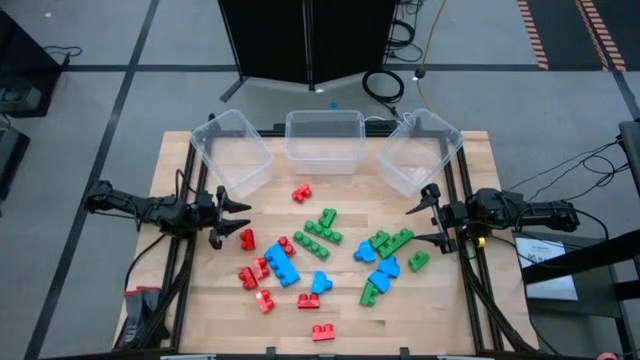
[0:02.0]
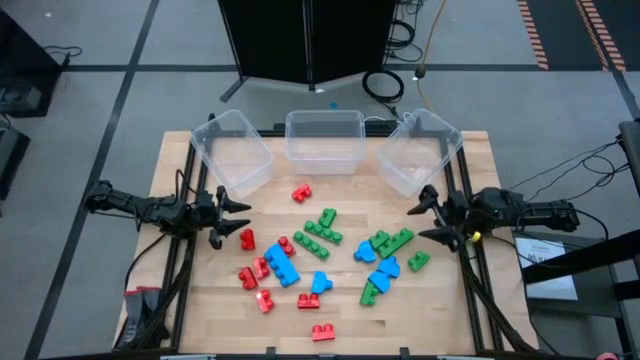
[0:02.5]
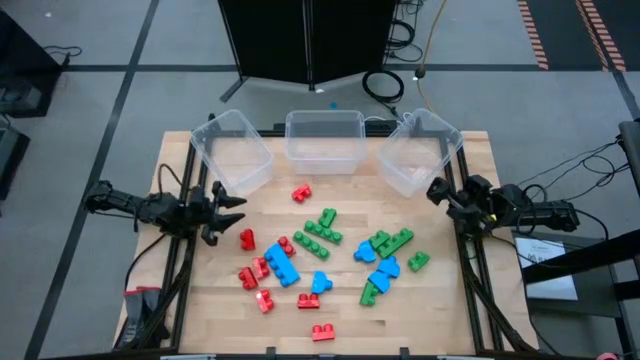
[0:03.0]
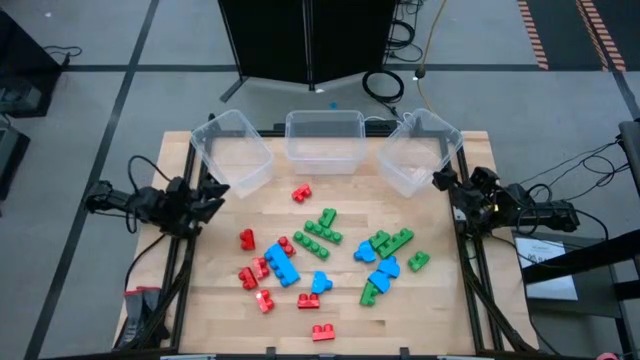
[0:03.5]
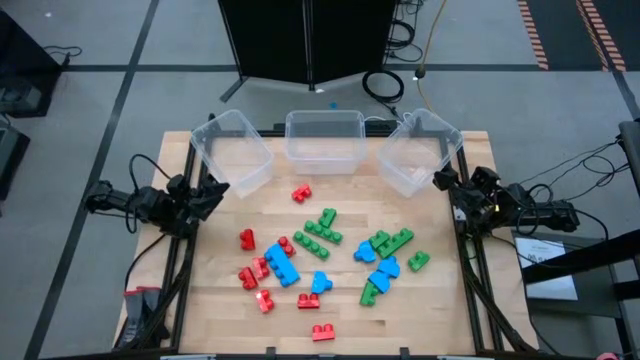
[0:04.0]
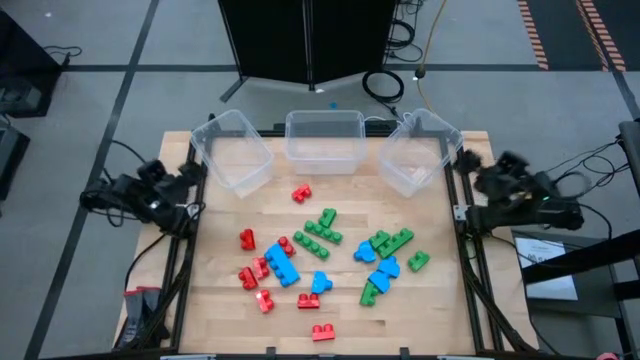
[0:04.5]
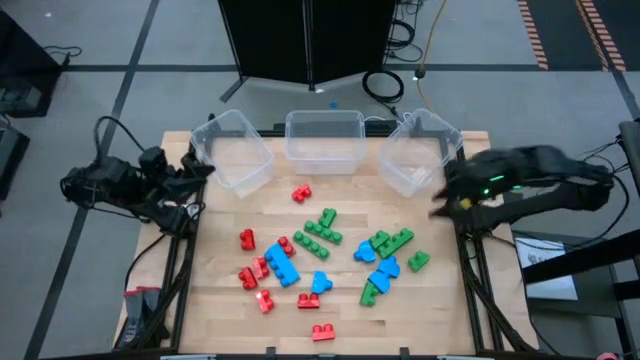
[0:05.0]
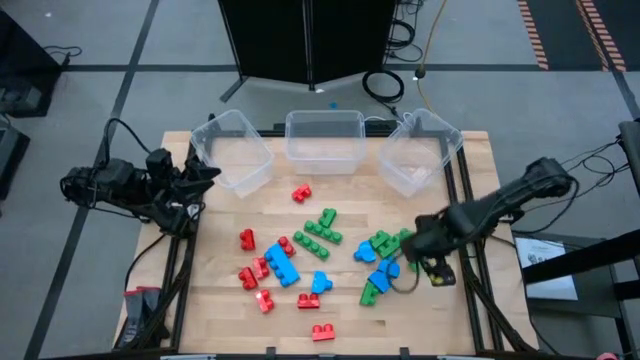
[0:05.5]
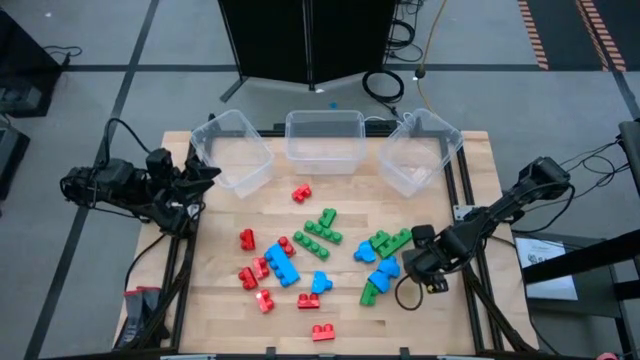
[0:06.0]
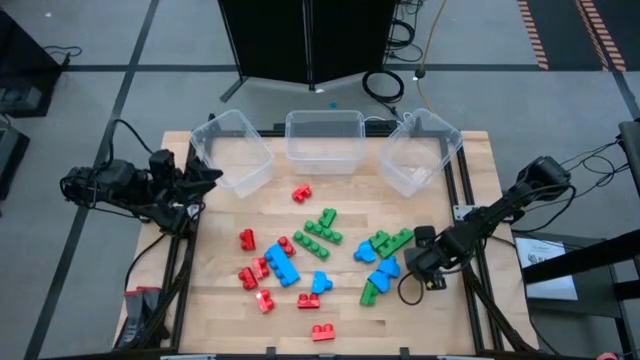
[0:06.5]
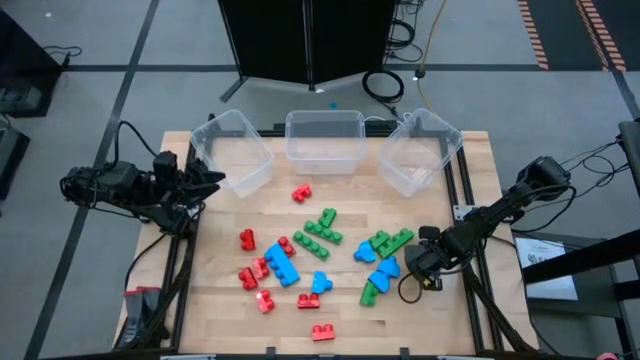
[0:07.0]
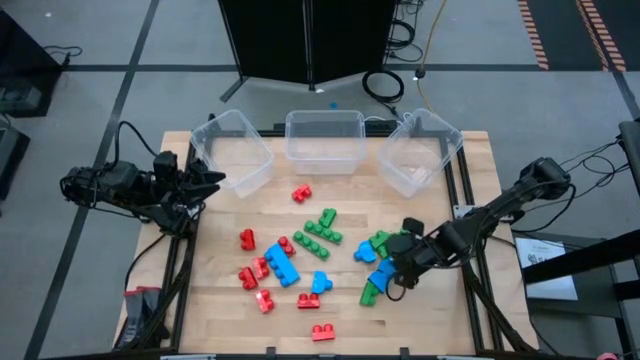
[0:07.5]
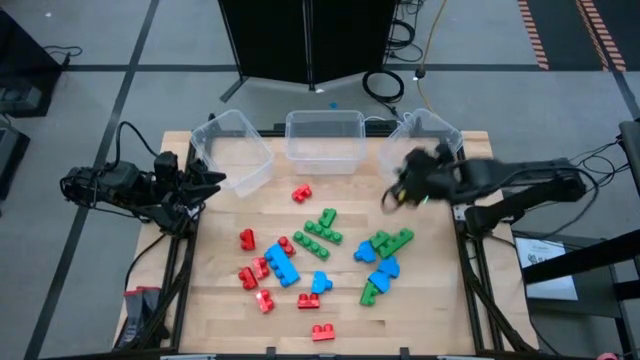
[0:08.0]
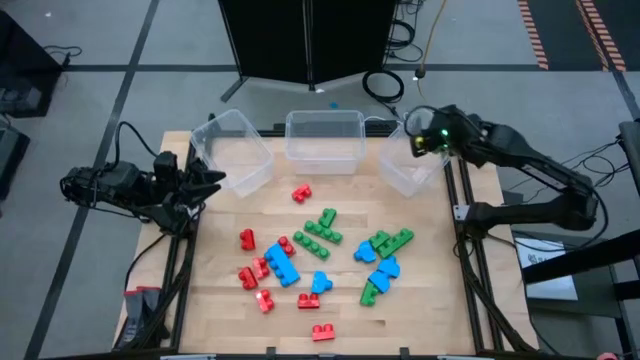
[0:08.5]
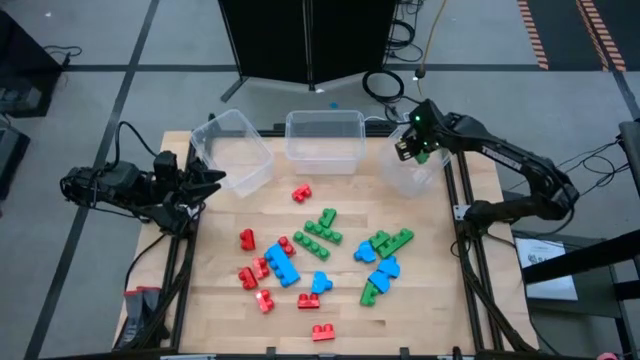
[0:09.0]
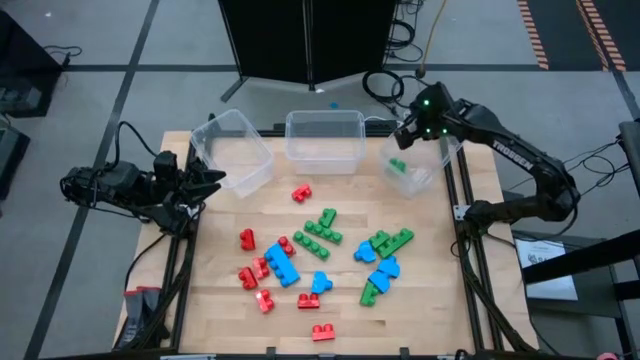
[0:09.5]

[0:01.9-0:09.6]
Task: Sort blocks
Put the green game piece into the right transparent bin

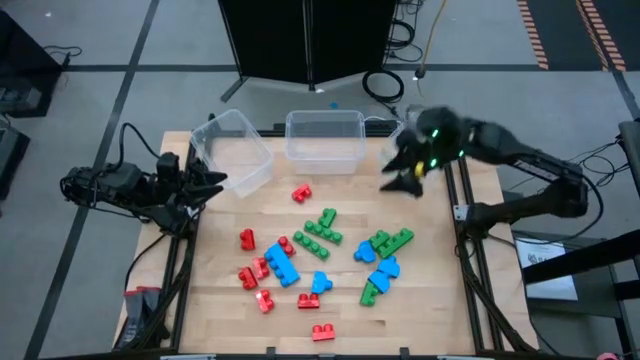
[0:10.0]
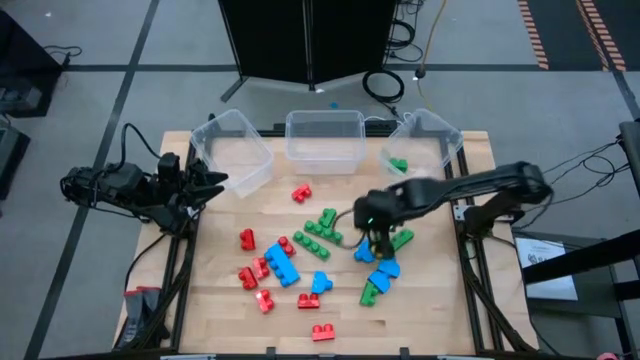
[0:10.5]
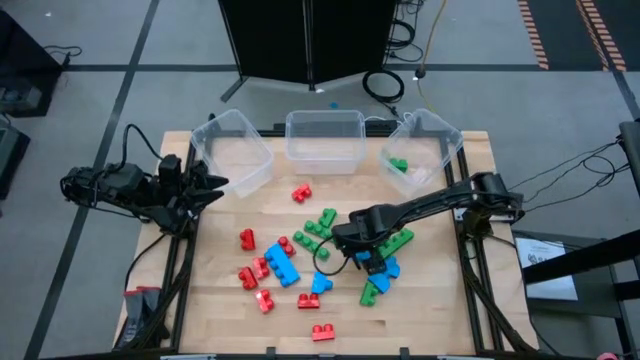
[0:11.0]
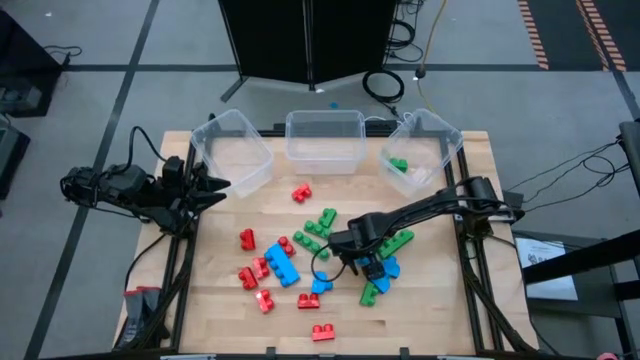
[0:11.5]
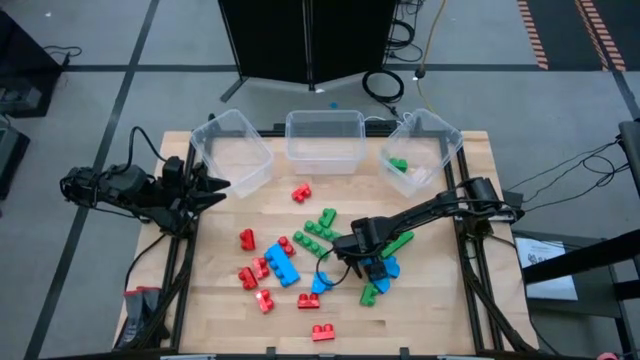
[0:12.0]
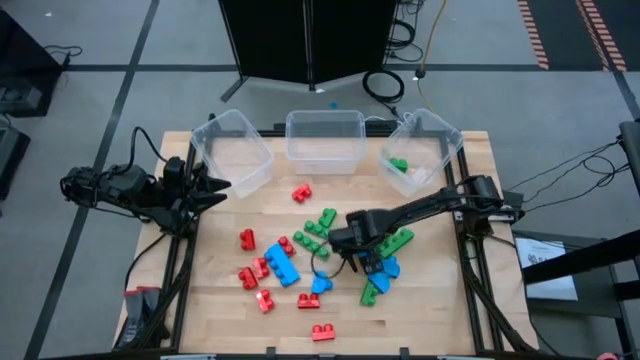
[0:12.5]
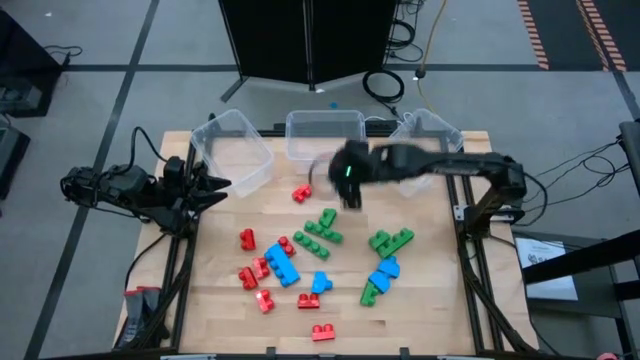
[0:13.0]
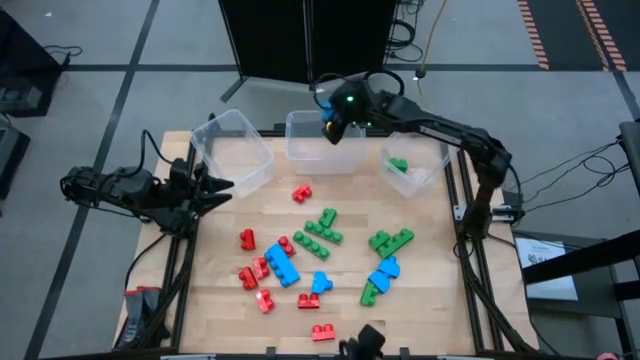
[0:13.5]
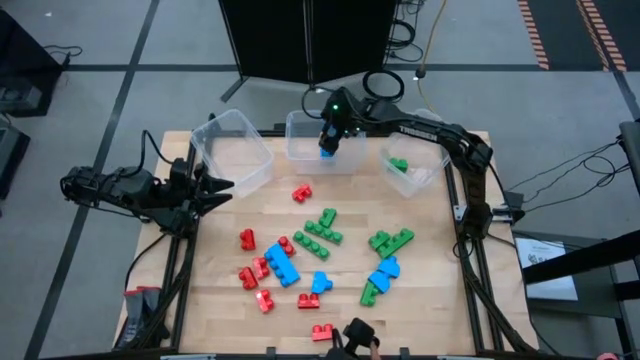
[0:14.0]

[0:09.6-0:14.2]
Put the blue game piece into the middle transparent bin

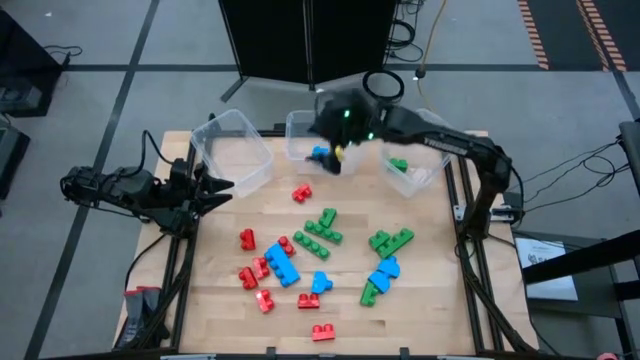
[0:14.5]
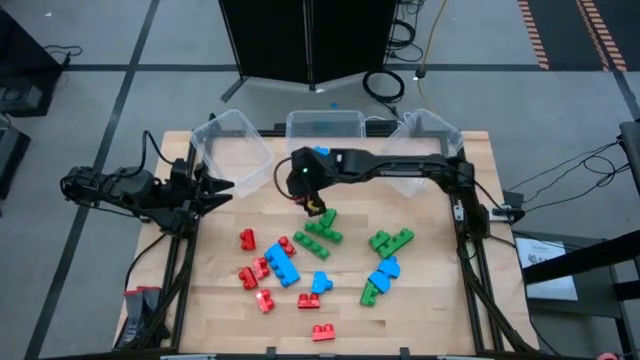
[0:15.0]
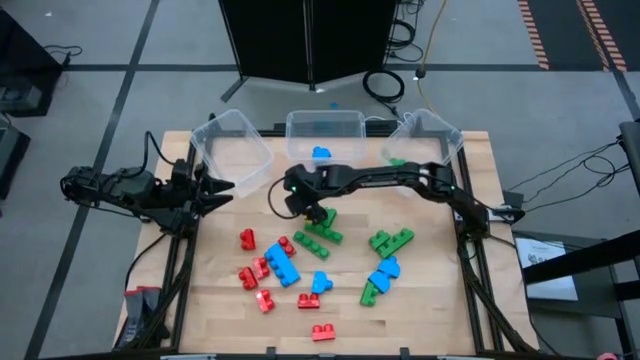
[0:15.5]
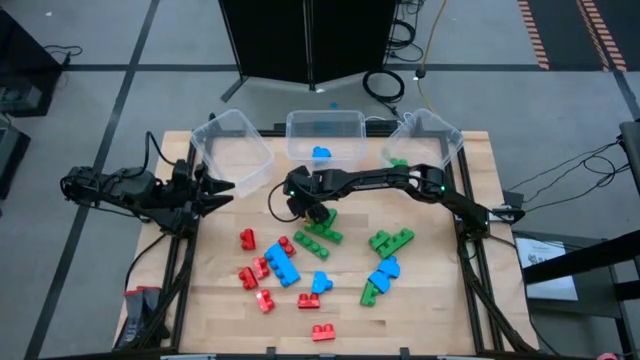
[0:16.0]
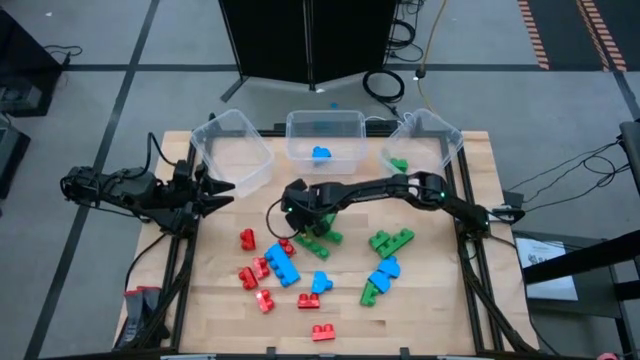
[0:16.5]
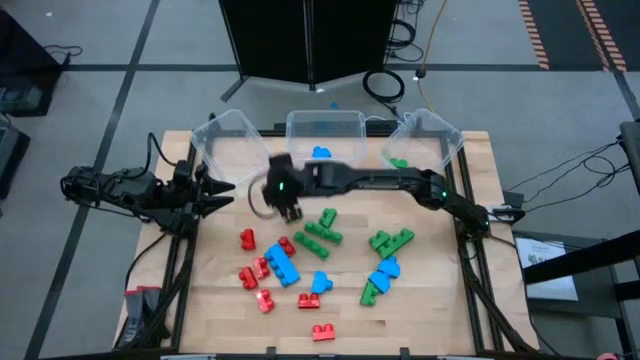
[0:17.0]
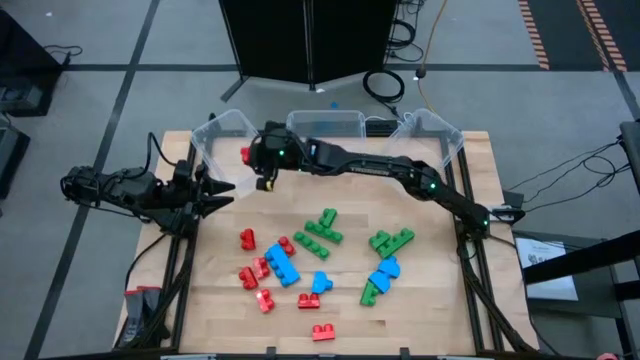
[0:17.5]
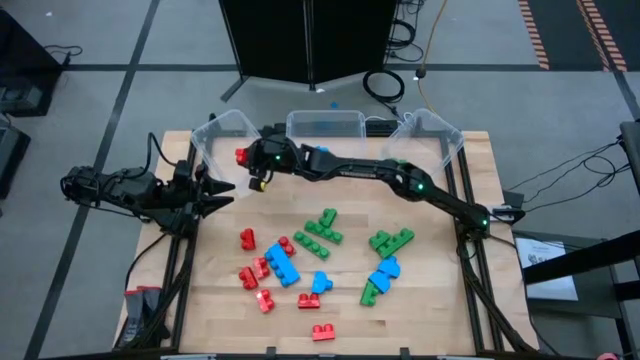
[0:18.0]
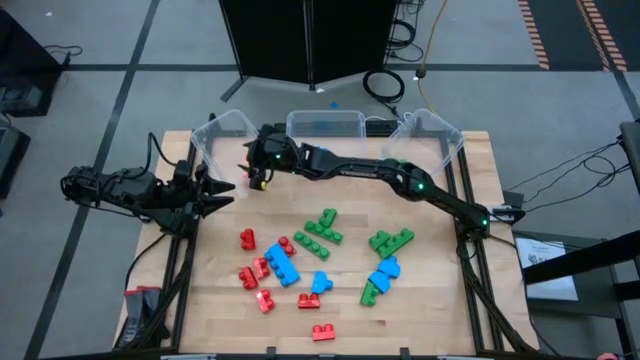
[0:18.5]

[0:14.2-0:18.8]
Put the red game piece into the left transparent bin

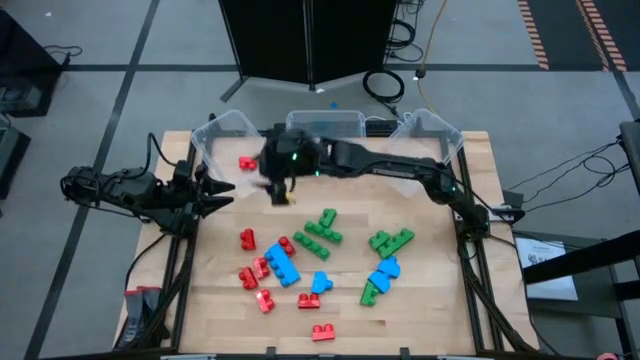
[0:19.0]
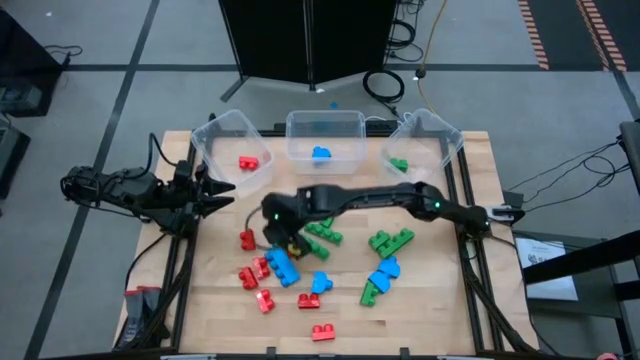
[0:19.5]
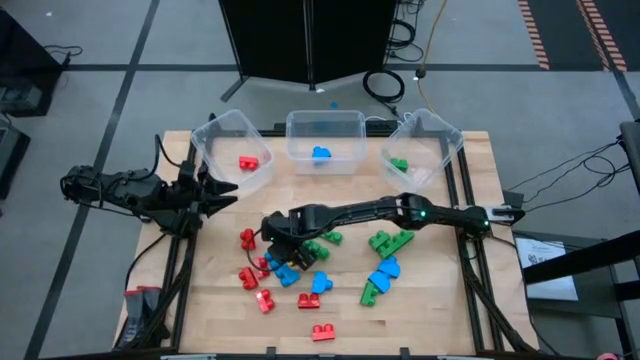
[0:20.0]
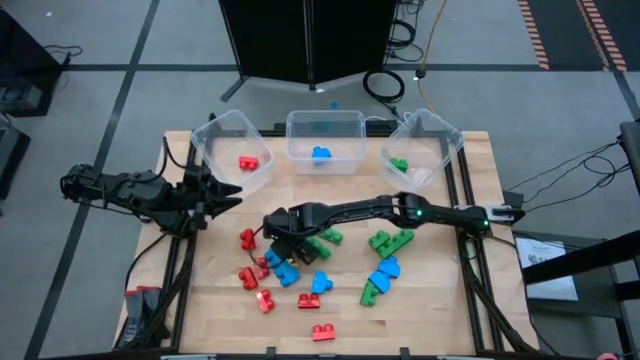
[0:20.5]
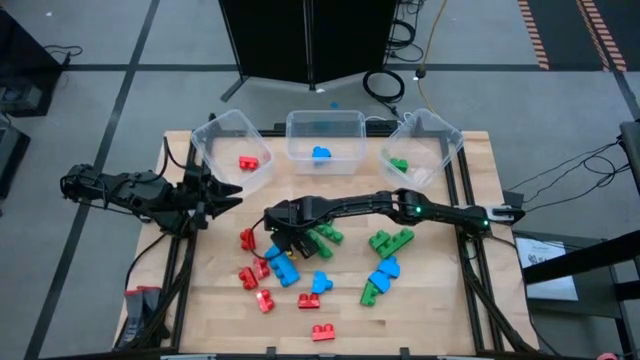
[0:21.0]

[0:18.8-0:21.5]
Put the red game piece into the left transparent bin
